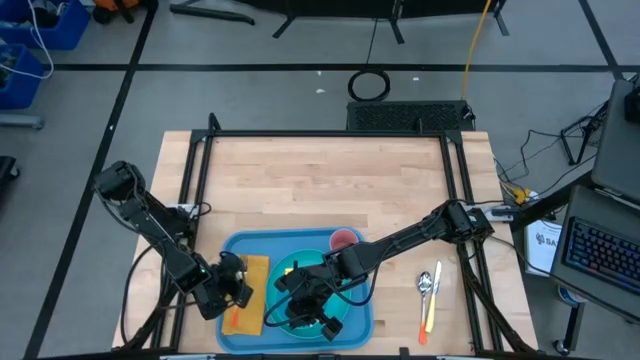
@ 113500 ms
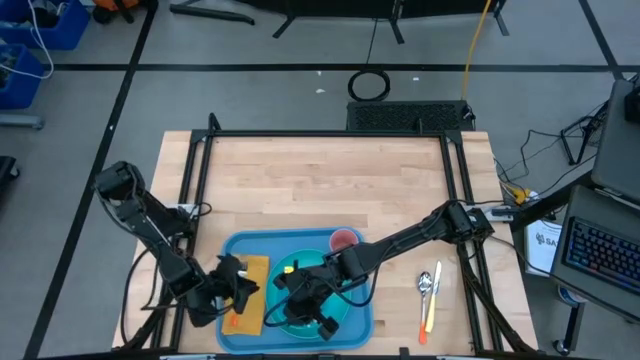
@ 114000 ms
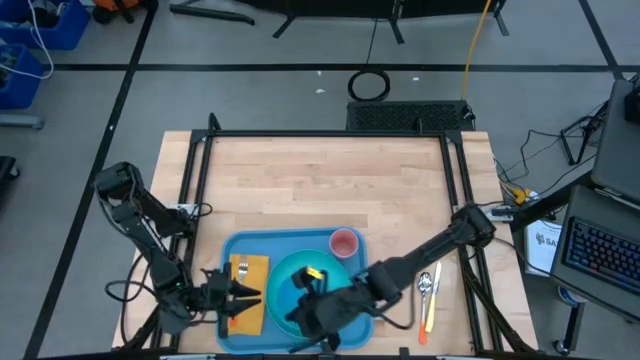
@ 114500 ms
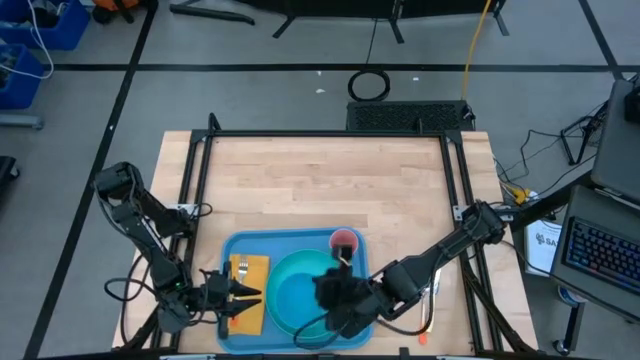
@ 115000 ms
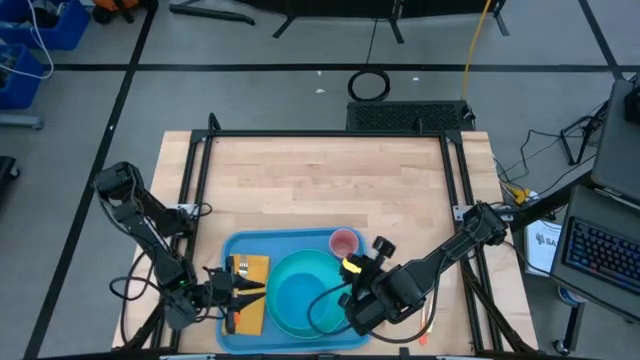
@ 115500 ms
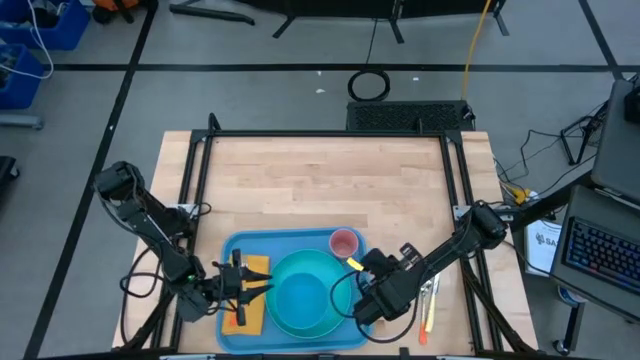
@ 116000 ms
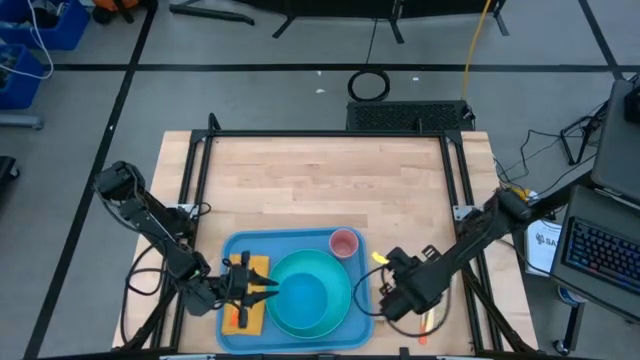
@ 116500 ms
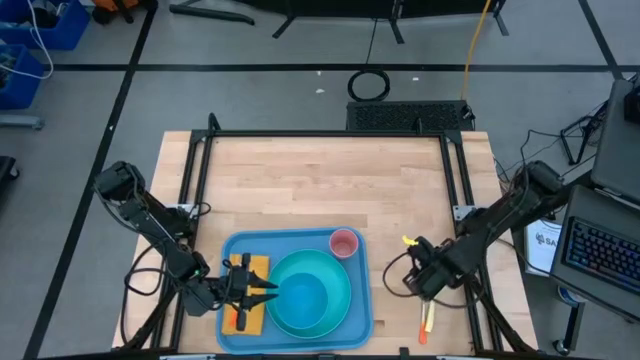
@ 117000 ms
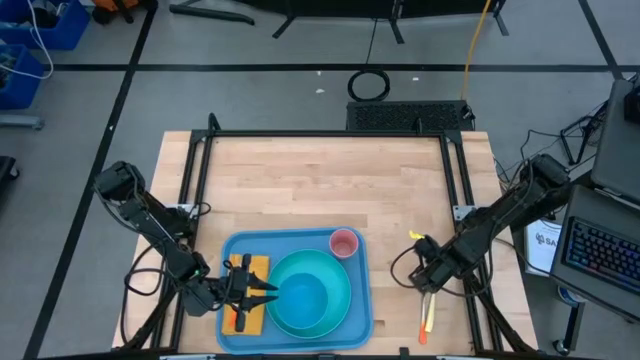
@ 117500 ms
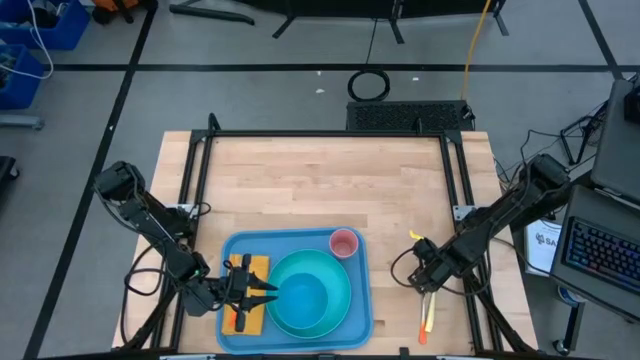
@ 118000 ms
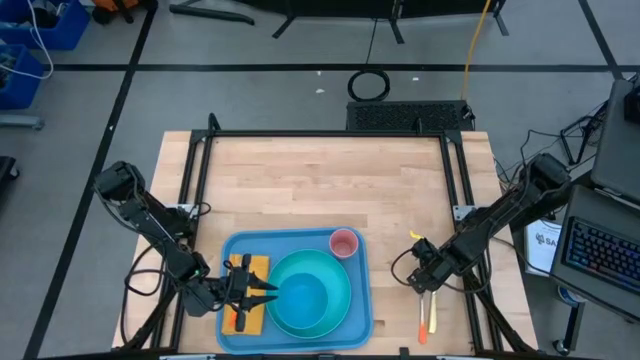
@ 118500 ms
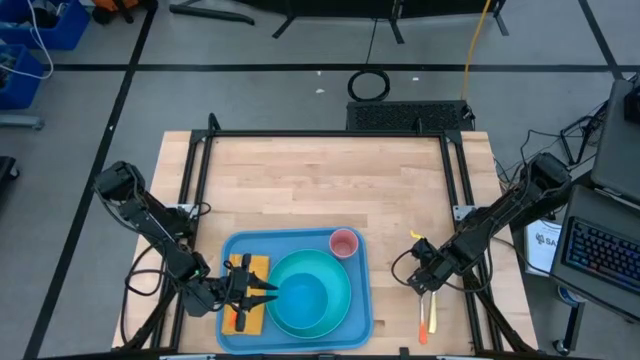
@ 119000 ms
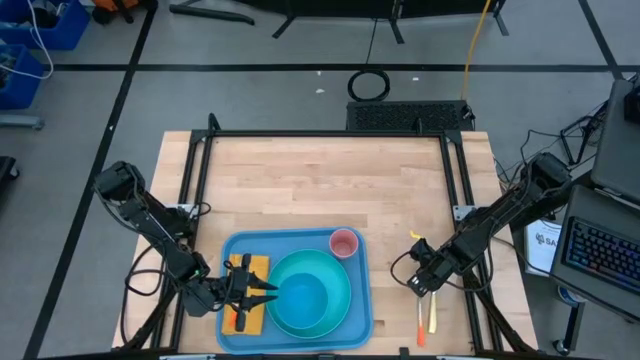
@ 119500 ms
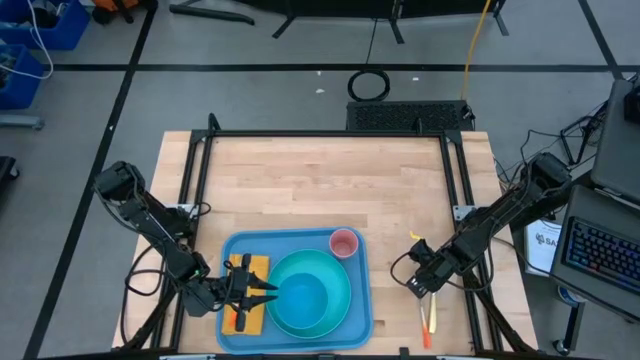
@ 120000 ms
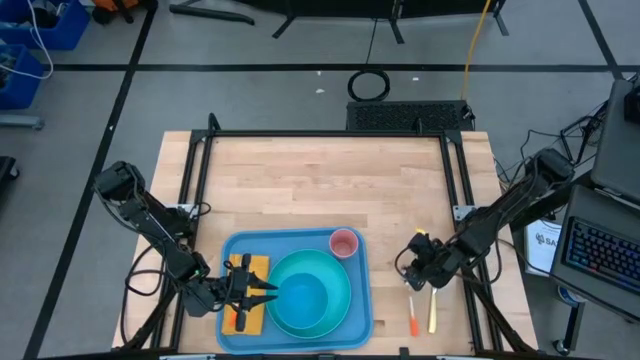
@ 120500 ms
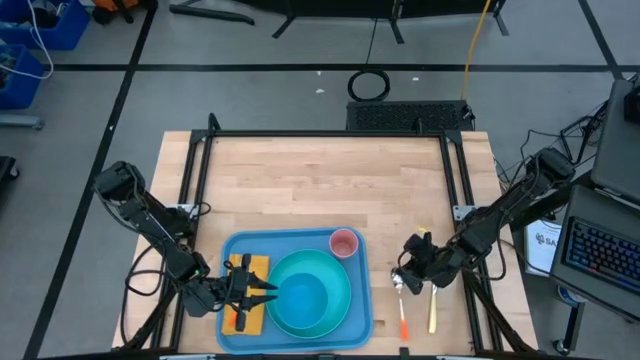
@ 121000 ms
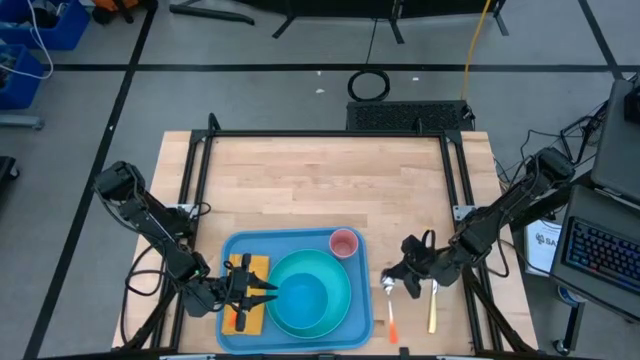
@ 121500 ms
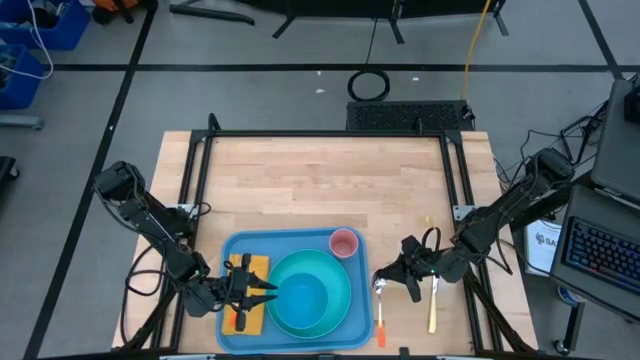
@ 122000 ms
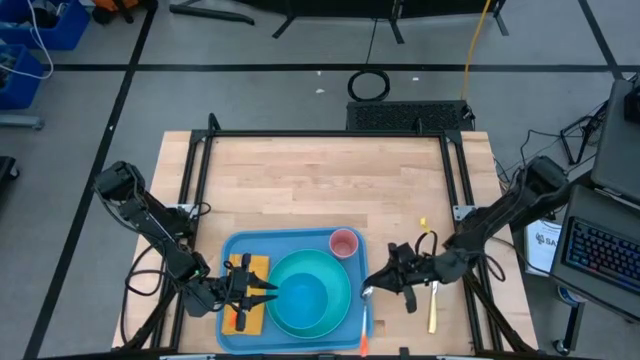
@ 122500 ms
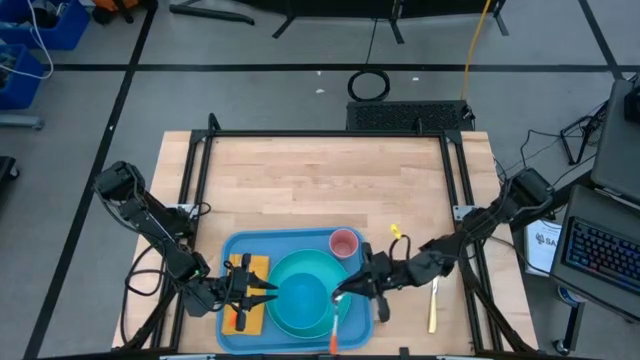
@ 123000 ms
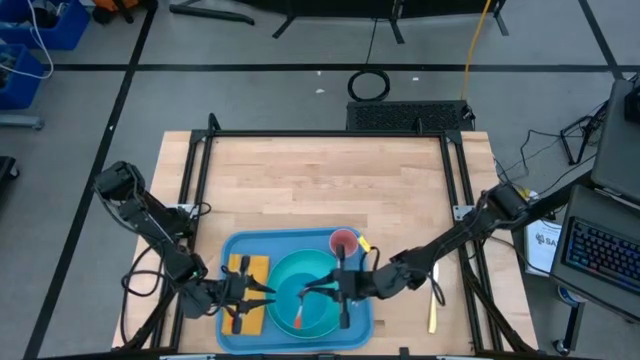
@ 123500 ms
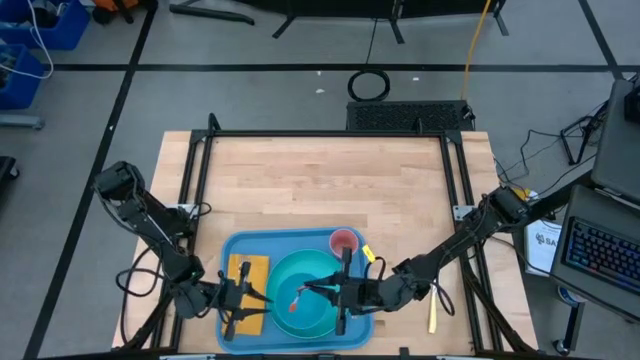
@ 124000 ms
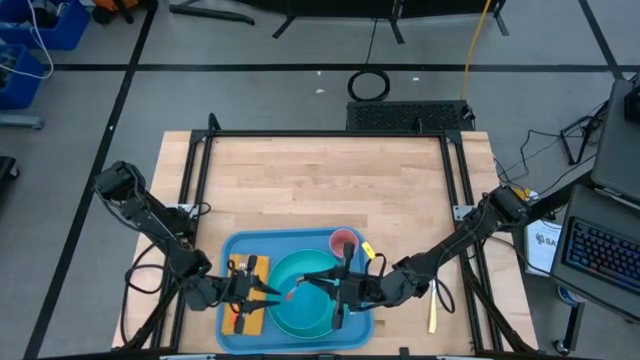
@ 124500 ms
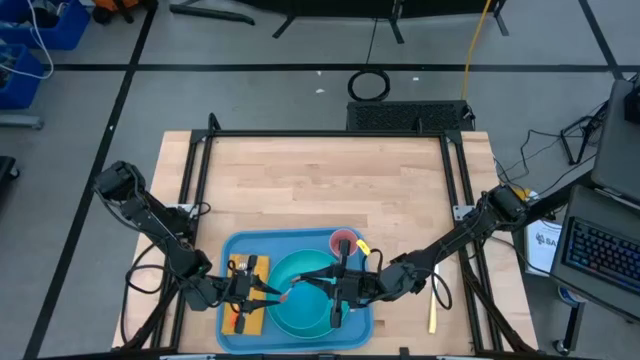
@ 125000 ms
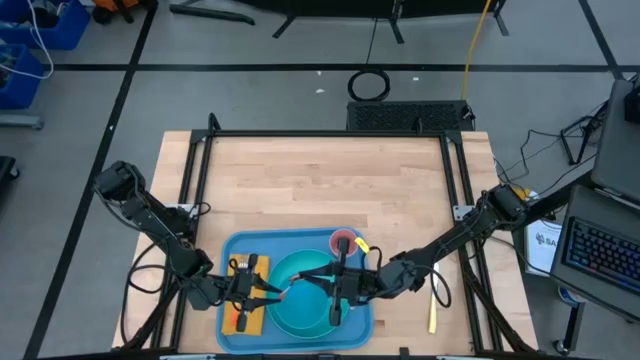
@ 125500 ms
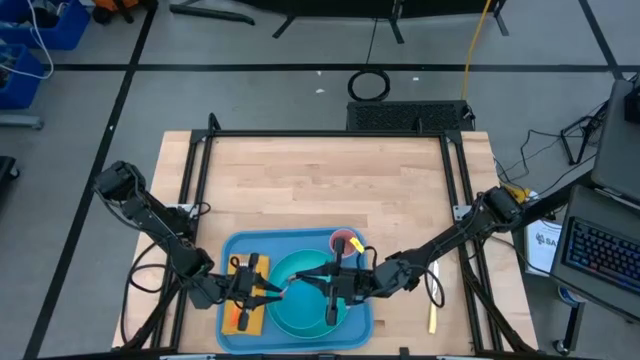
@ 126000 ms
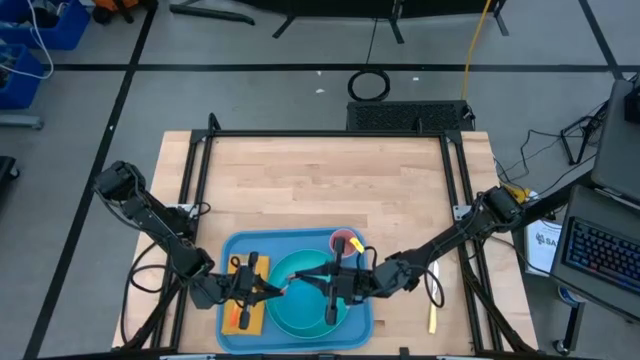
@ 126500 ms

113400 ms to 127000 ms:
Task: Set up tray
Put the orange spoon on the yellow table napkin to the right of the orange fork

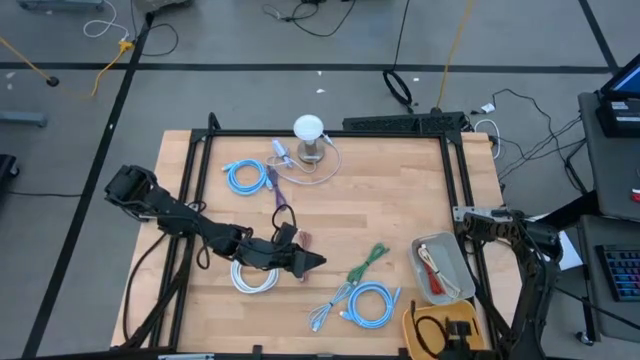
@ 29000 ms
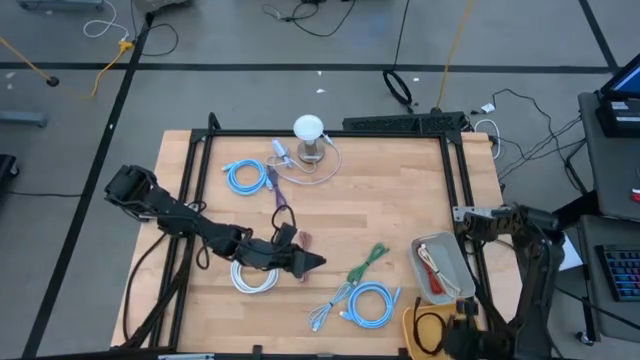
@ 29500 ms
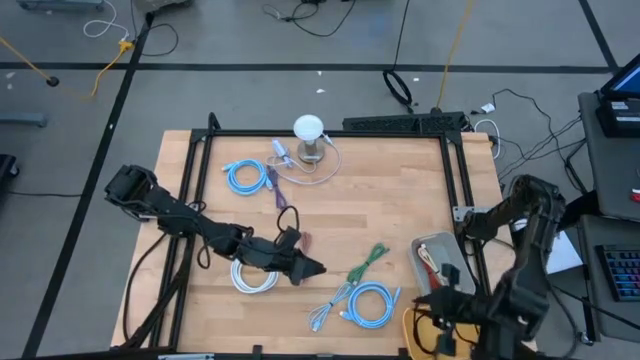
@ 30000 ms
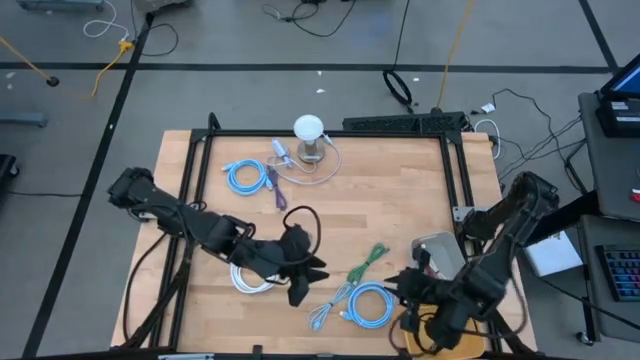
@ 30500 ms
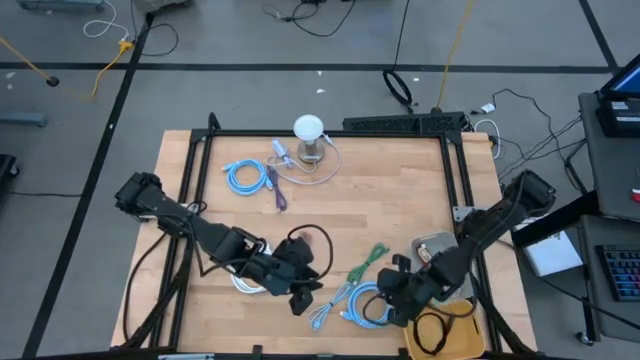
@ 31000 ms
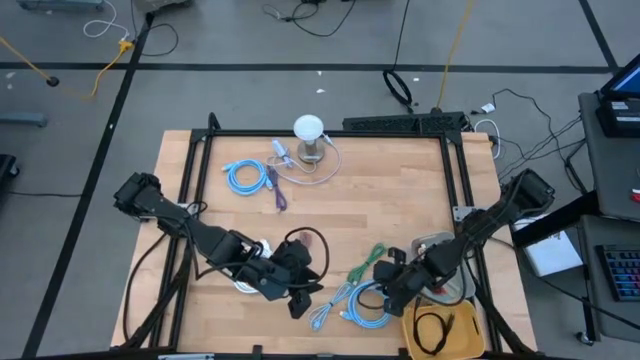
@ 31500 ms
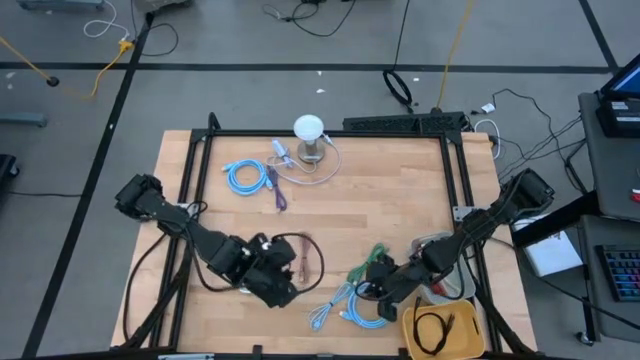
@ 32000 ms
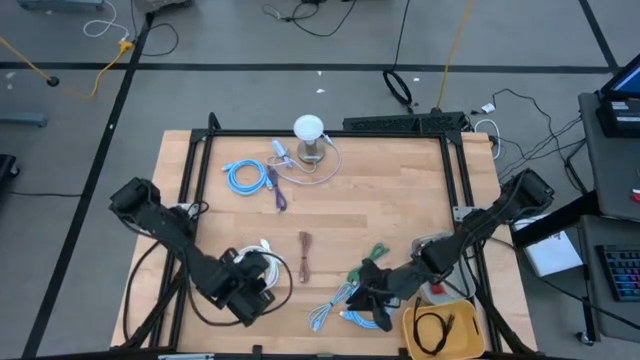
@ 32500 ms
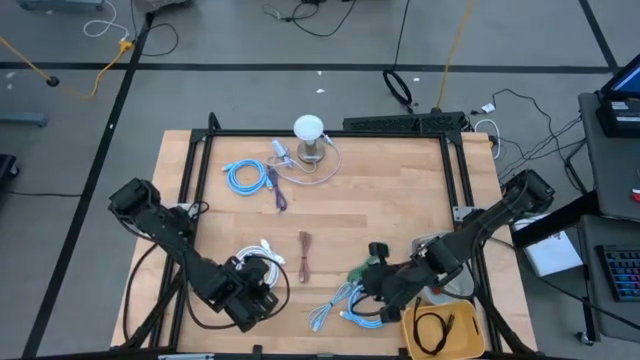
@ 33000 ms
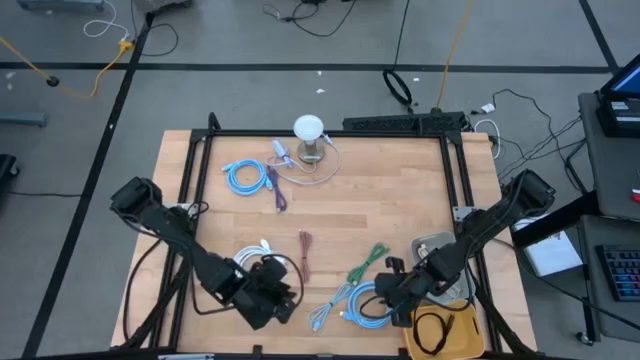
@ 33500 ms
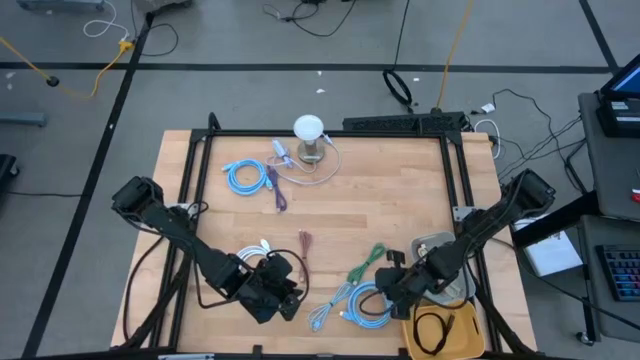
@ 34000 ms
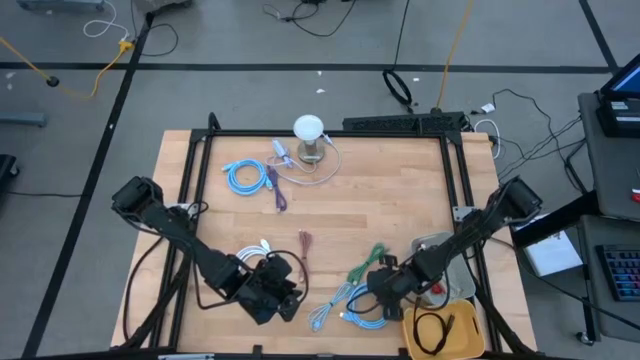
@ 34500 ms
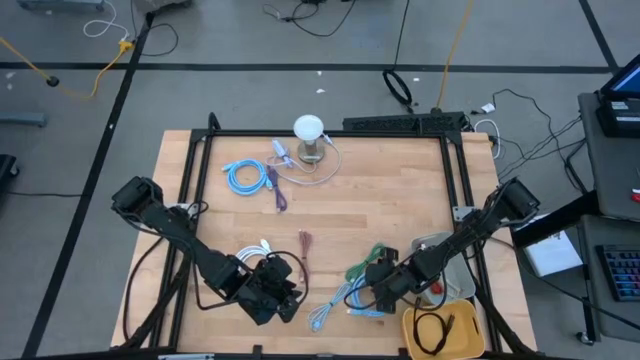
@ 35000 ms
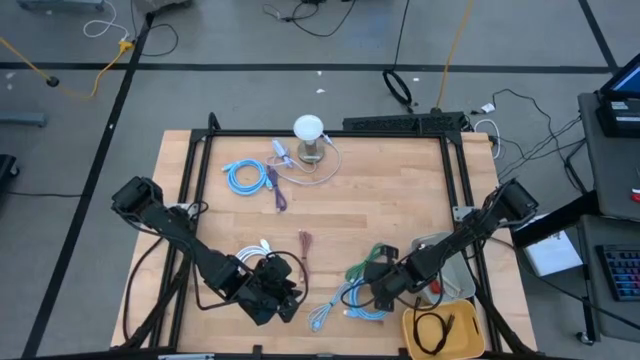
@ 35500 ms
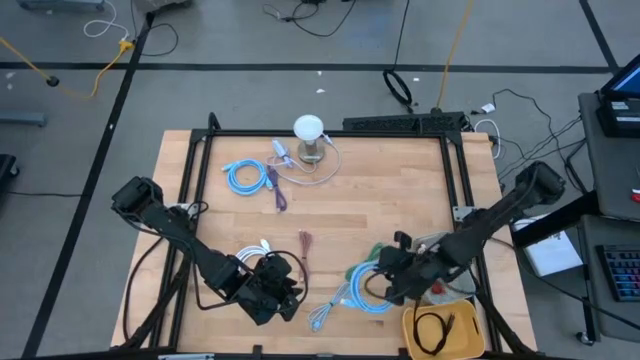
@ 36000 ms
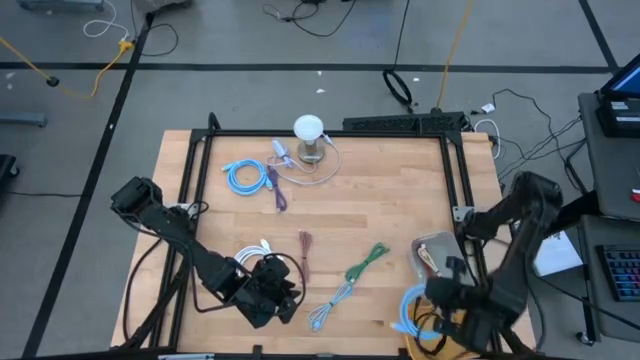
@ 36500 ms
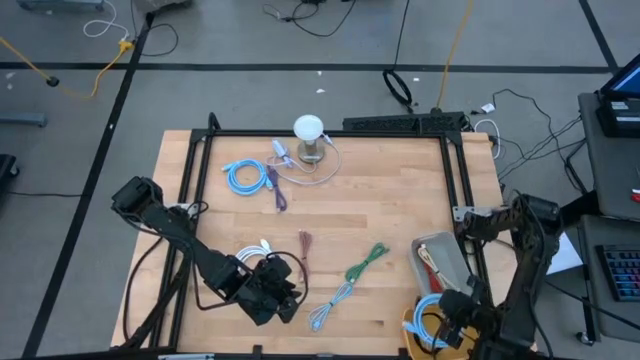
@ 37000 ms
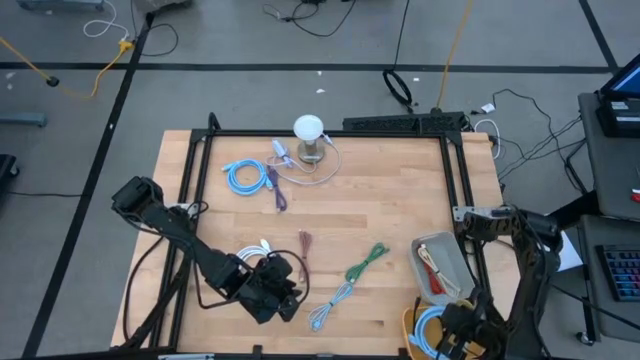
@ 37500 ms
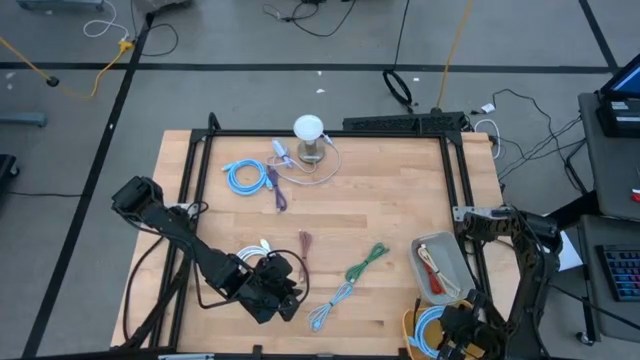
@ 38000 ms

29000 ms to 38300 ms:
Task: Pick & Place USB Port
Put the bottom blue HDMI cable into the yellow bin
